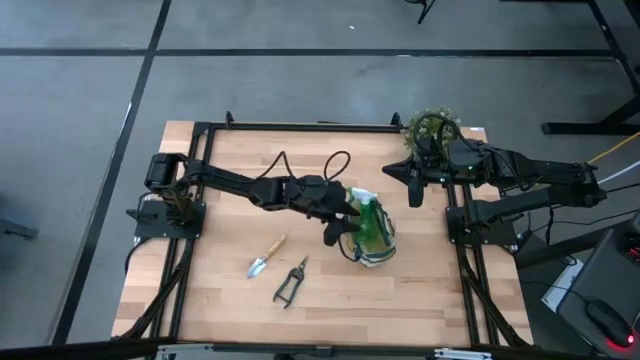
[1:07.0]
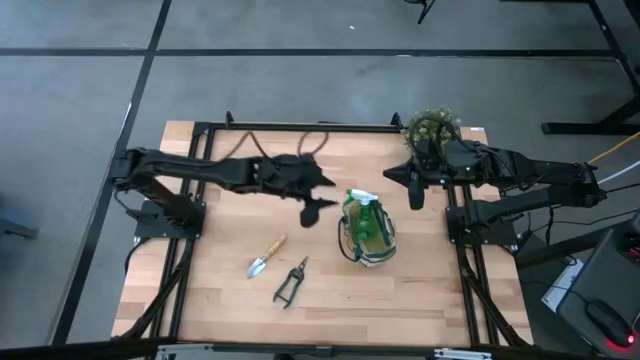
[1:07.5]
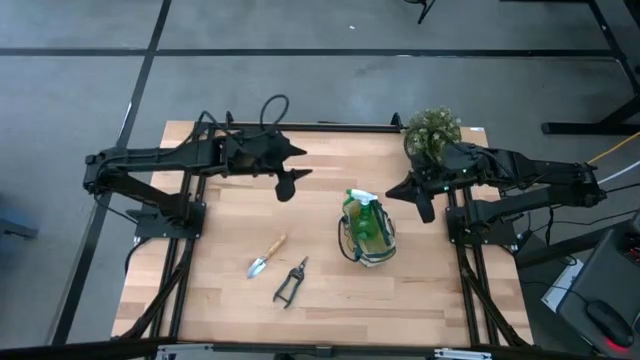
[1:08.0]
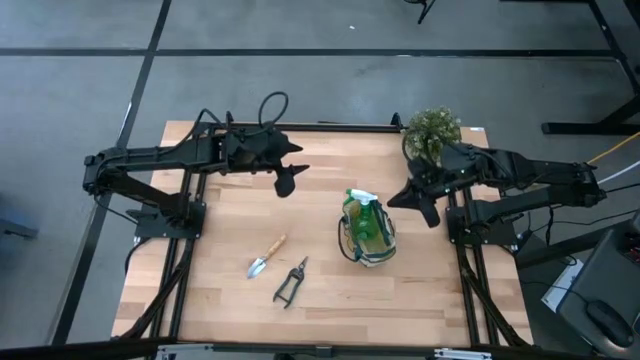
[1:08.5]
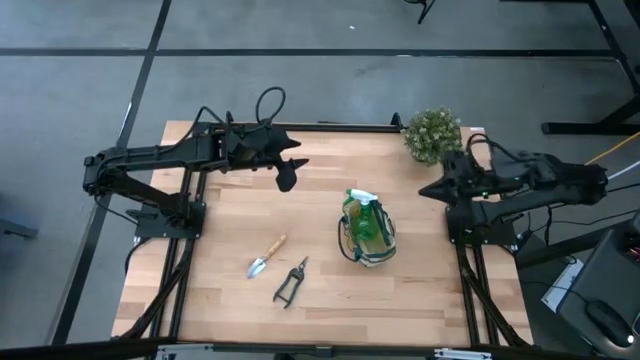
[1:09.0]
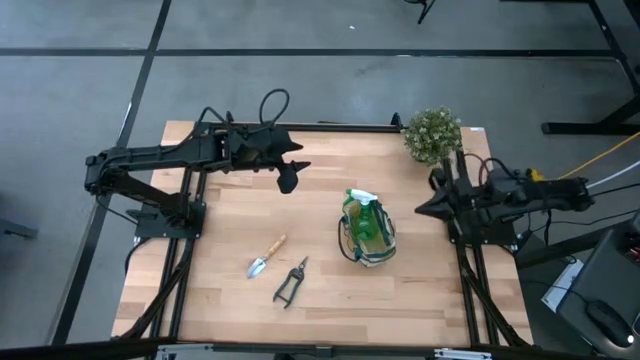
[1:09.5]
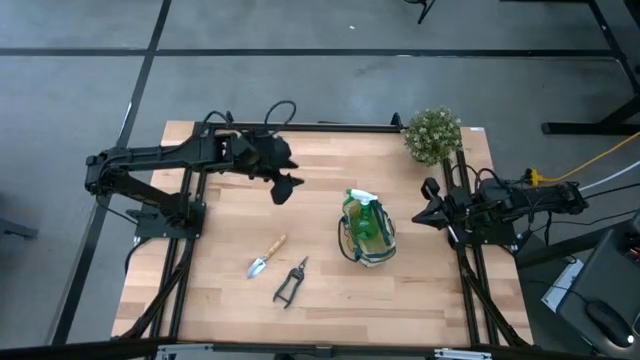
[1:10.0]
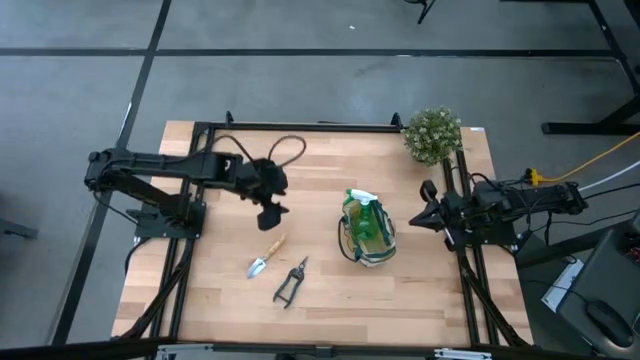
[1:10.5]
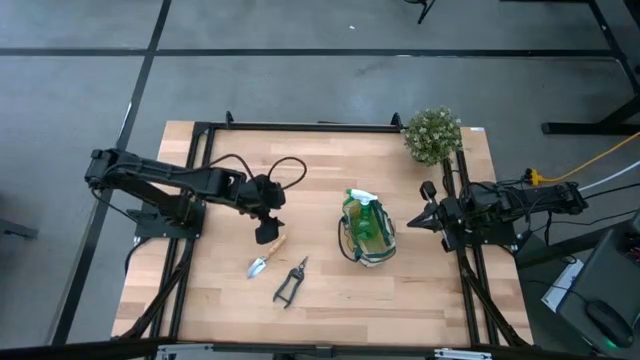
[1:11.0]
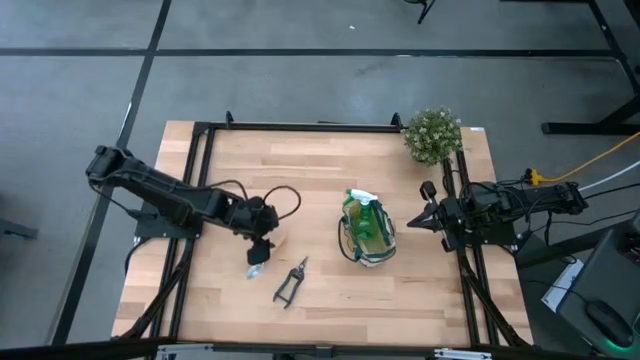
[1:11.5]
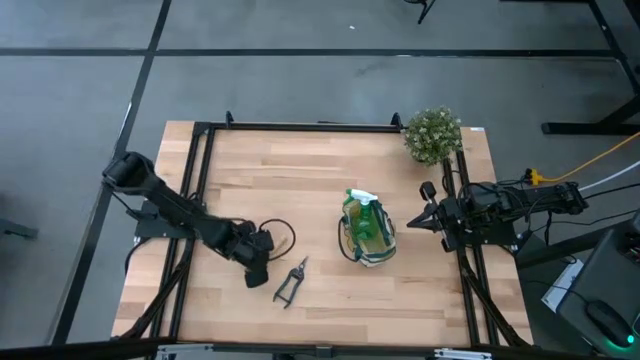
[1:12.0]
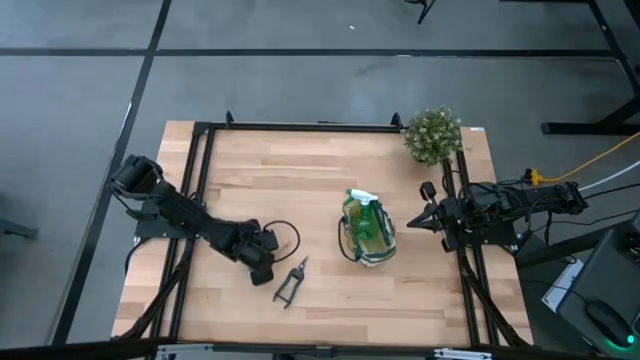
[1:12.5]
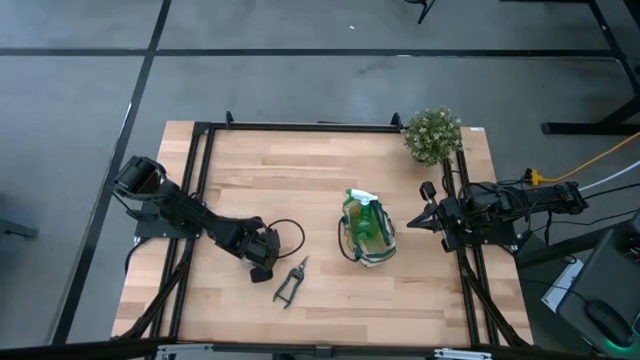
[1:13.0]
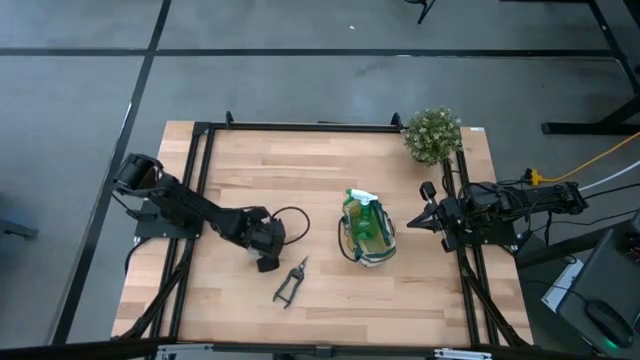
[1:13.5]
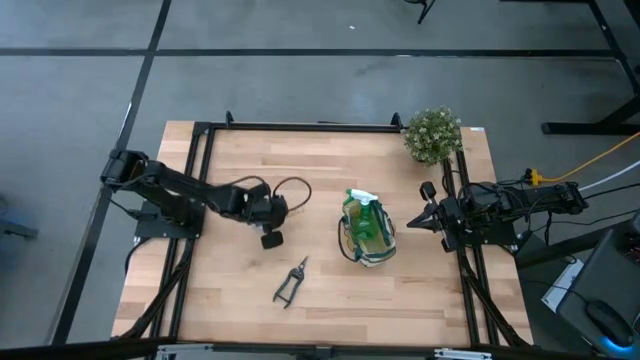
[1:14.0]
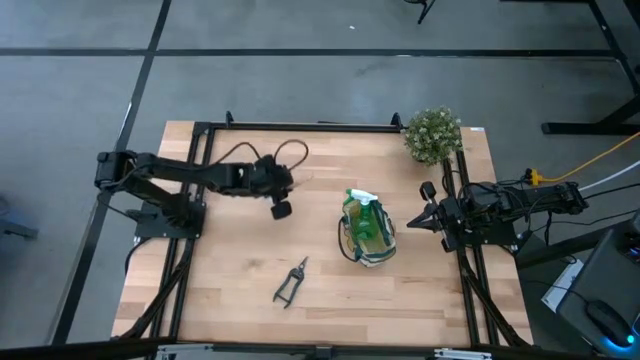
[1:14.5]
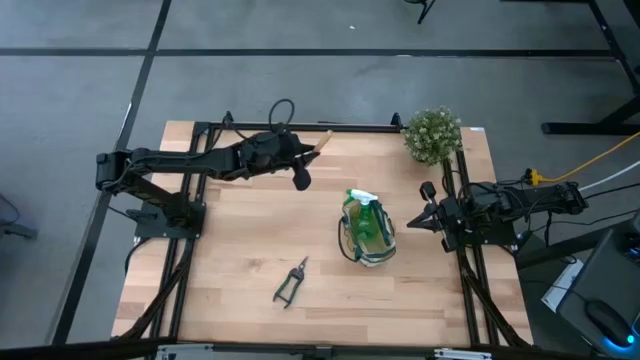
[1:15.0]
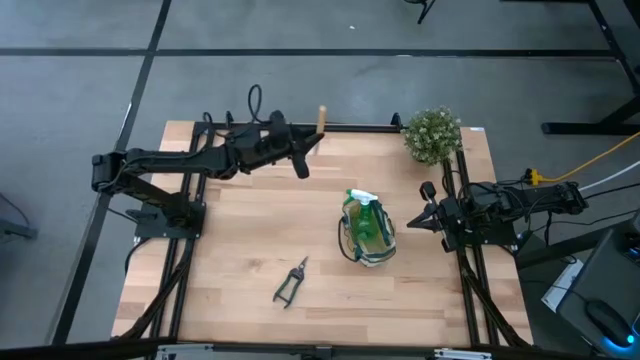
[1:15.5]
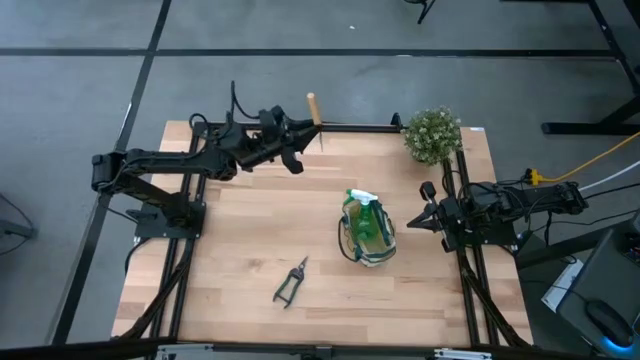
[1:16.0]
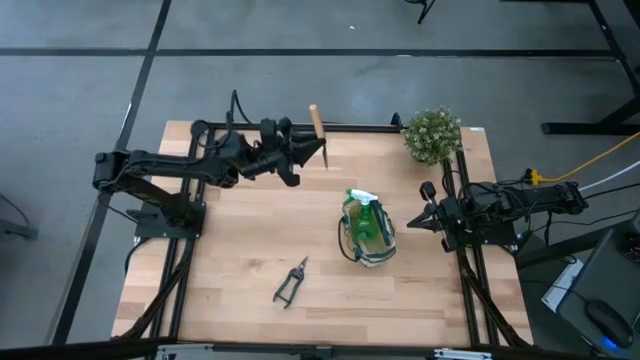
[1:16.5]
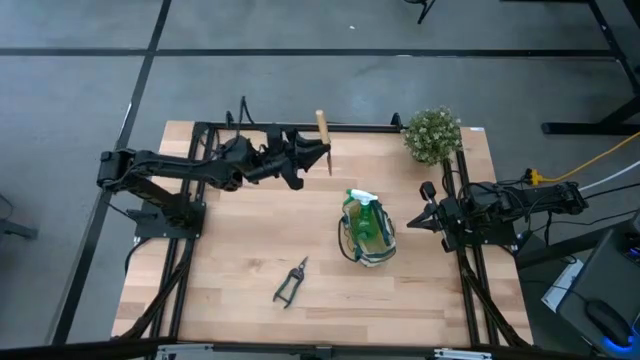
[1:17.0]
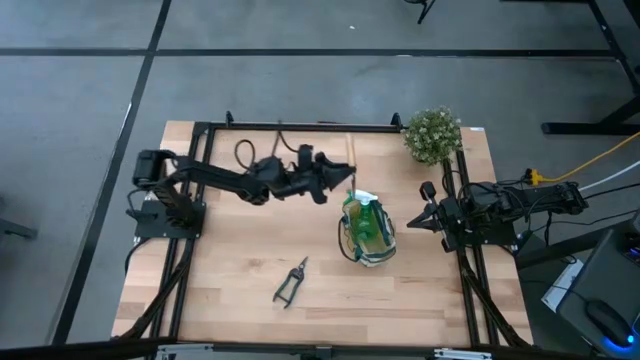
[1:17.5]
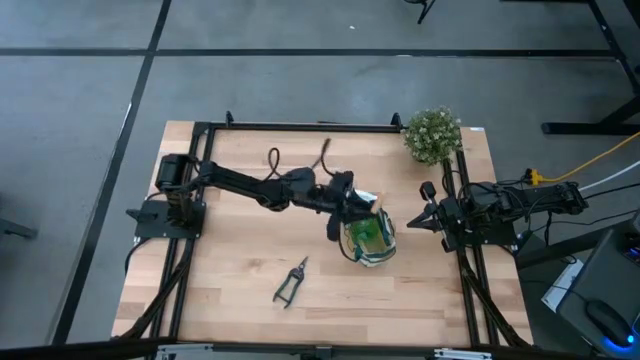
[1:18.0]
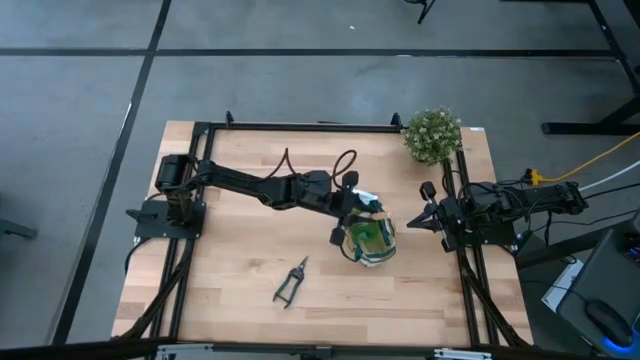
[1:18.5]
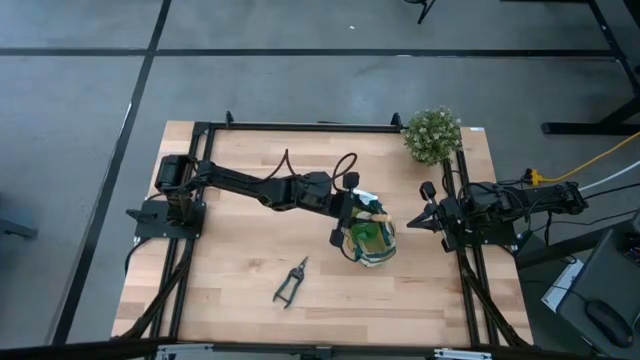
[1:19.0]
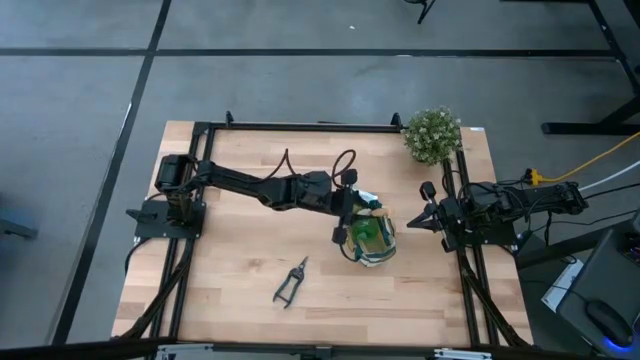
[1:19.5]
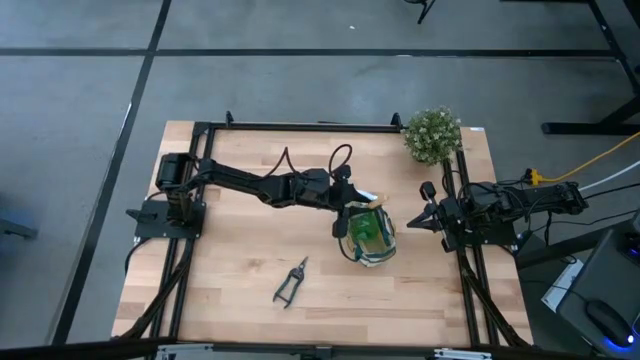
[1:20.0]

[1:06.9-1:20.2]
Task: Pick & Place Garden tools in Gardening bag
Put the trowel into the gardening bag

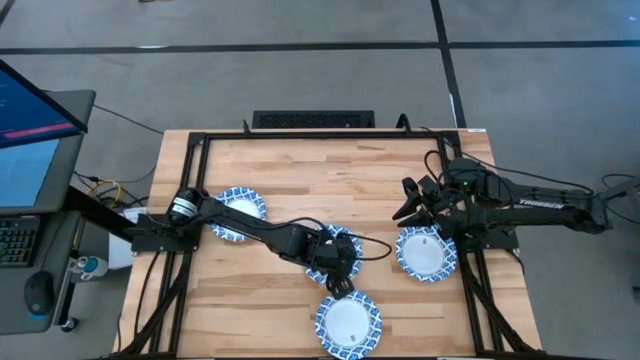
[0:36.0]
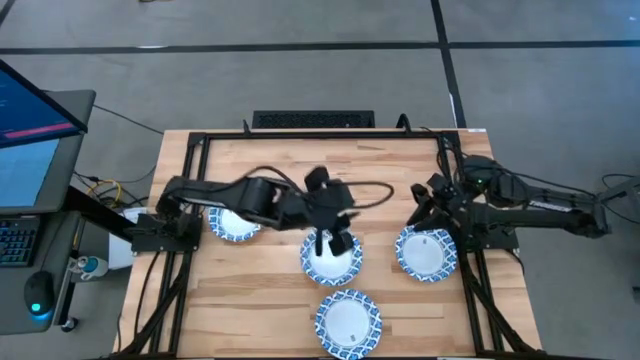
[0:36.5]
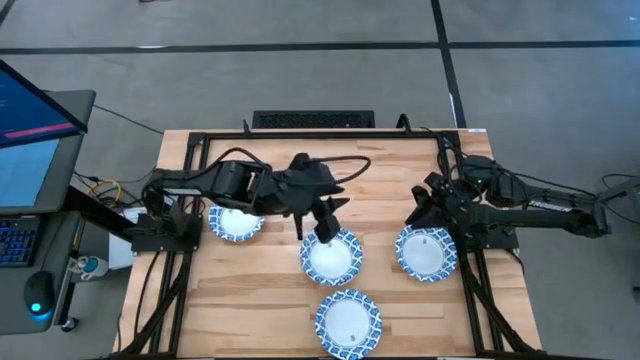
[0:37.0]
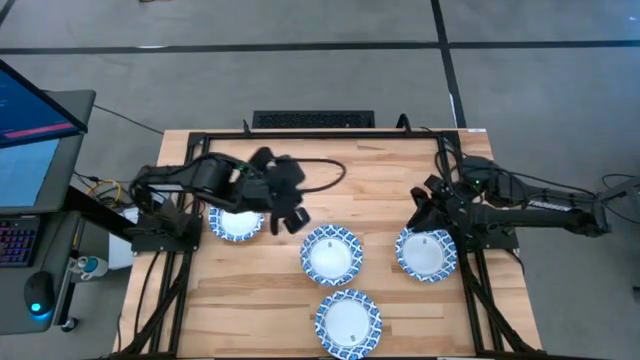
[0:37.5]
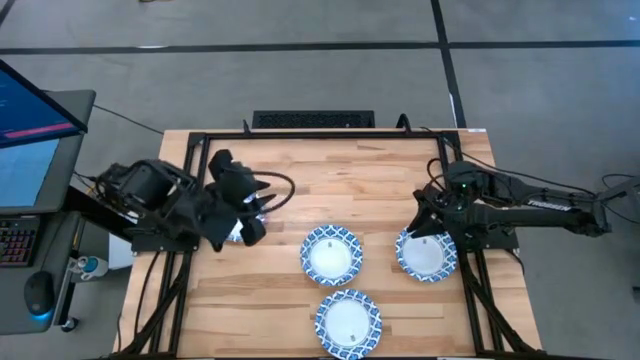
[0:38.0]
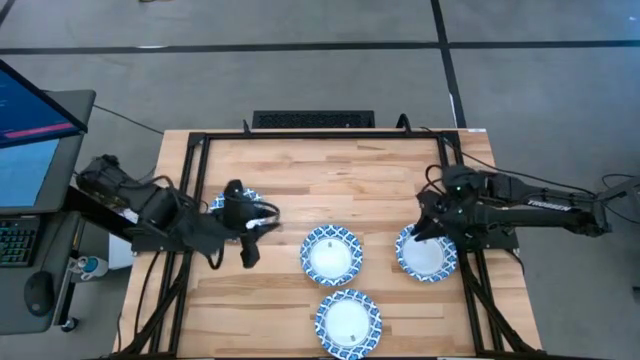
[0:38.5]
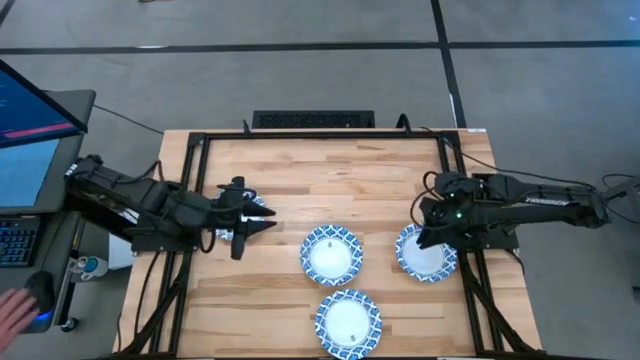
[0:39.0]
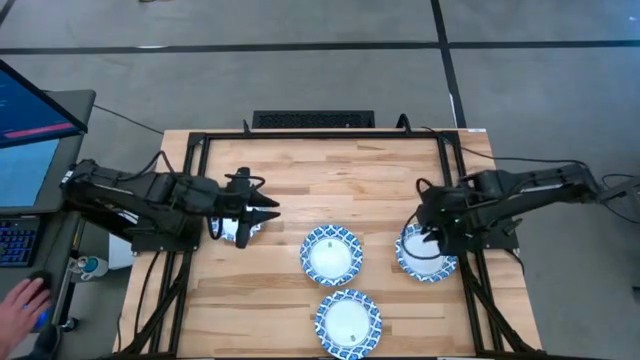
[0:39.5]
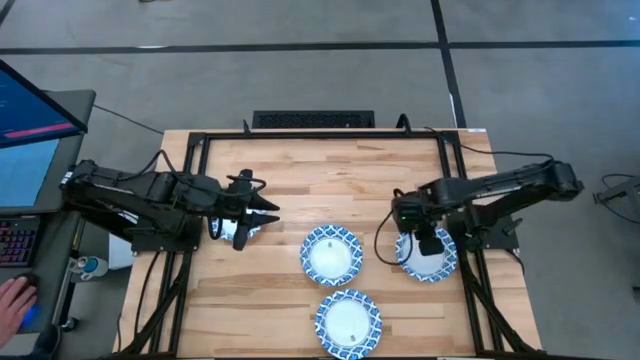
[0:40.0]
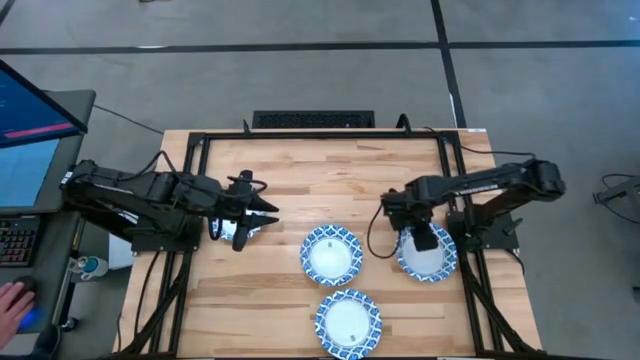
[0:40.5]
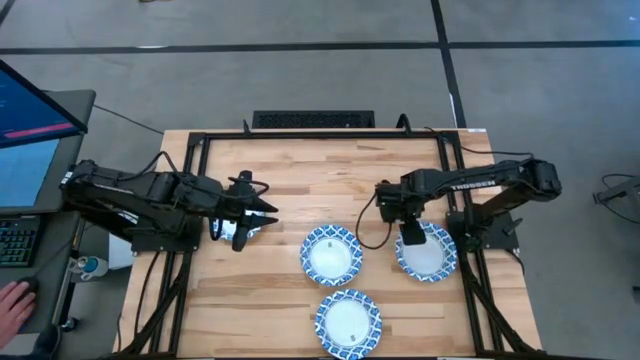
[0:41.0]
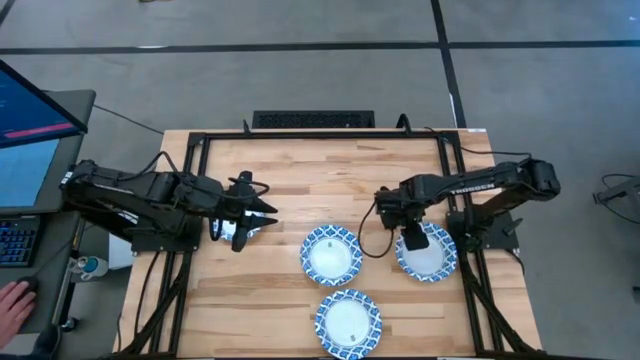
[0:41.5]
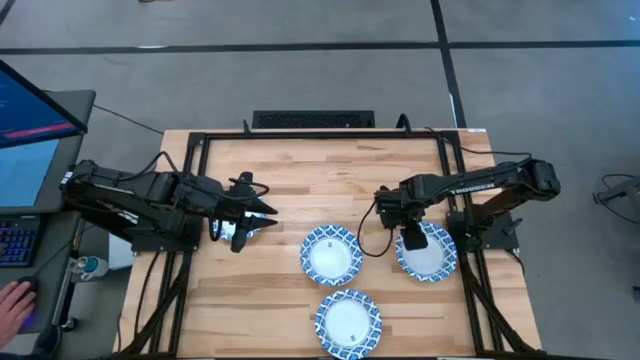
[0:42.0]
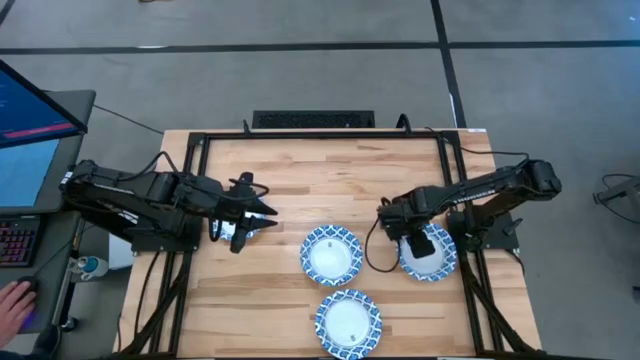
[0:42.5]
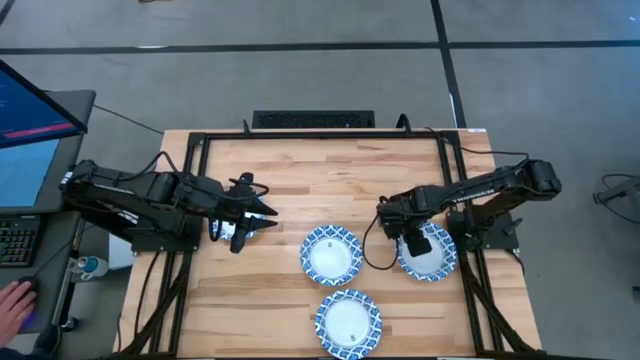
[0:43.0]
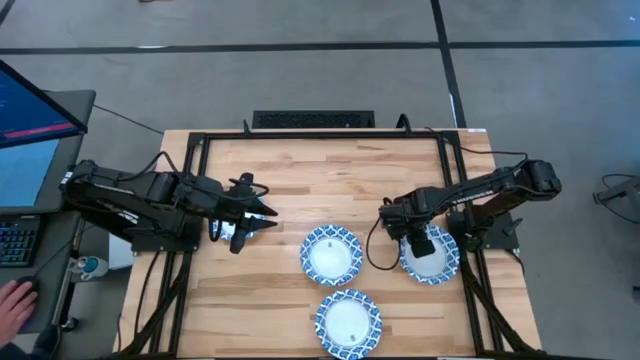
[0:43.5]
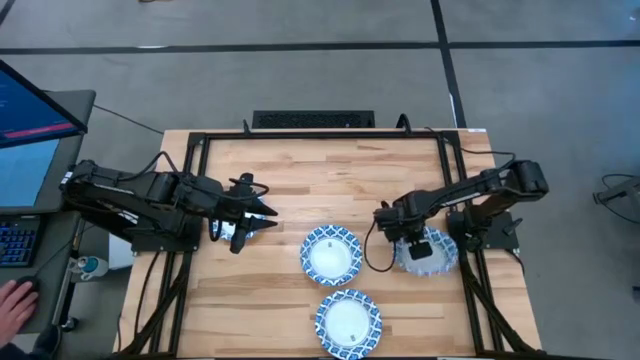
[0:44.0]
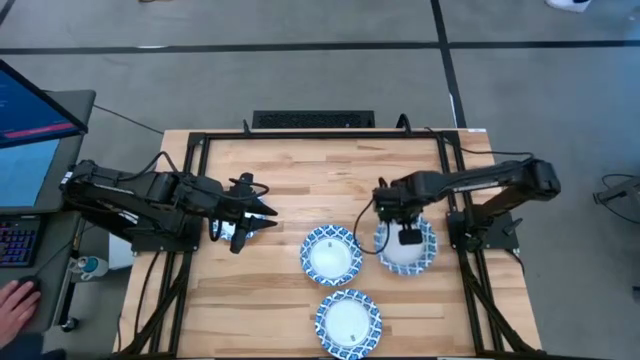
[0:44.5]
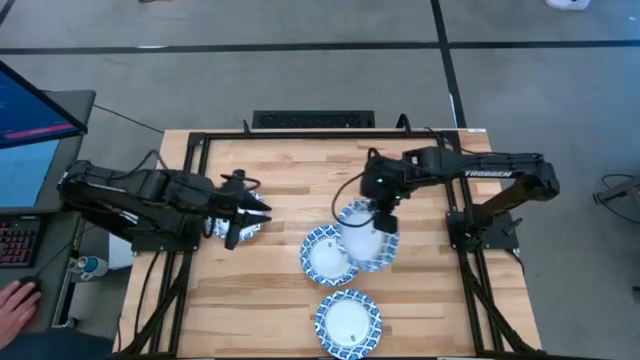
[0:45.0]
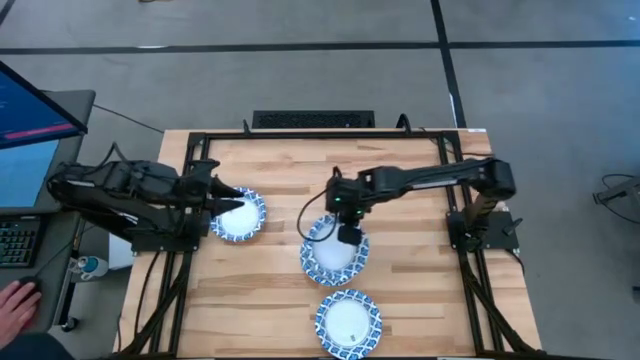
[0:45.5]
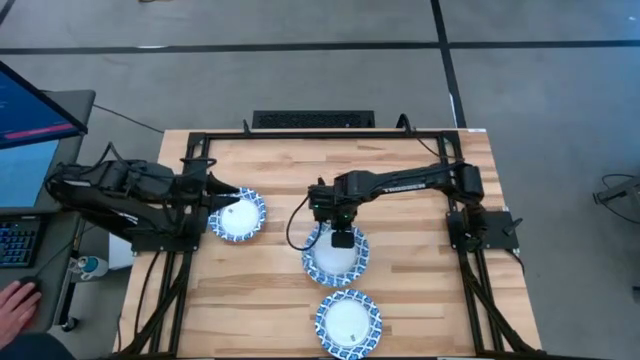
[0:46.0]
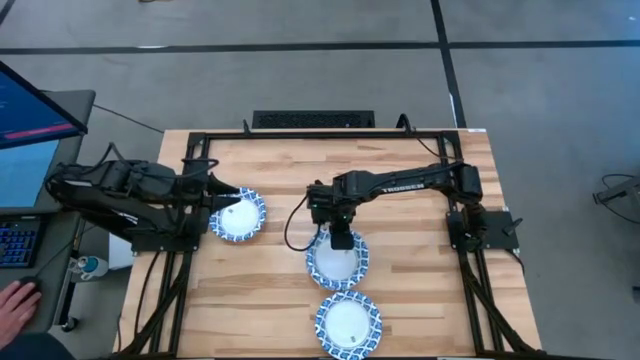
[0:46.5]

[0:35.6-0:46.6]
Task: Nest bowls inside each other
Stack the blue patterned bowl on the blue patterned bowl
